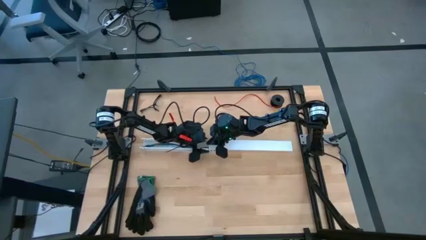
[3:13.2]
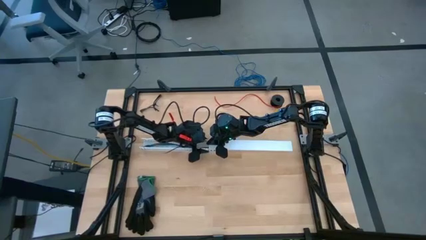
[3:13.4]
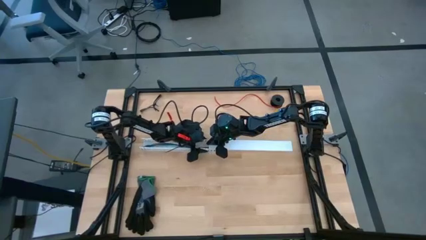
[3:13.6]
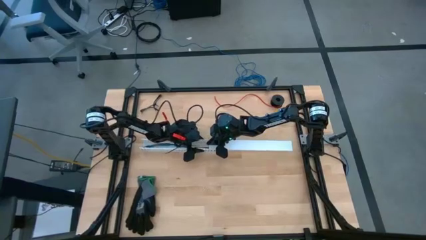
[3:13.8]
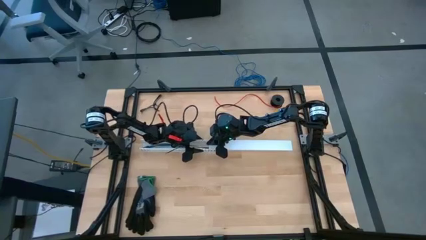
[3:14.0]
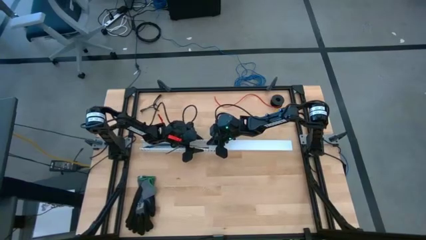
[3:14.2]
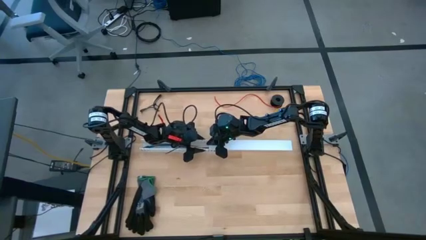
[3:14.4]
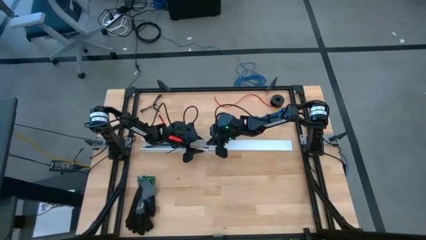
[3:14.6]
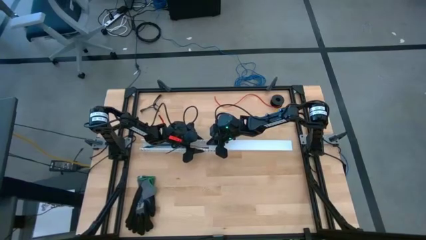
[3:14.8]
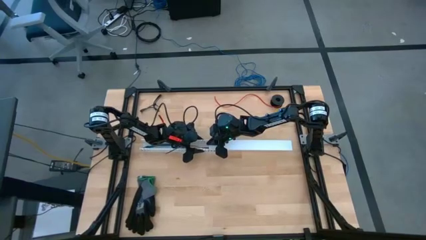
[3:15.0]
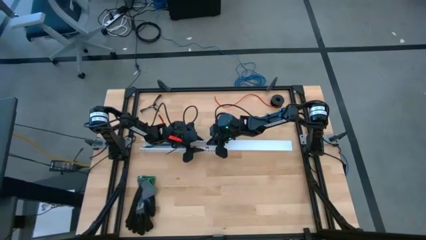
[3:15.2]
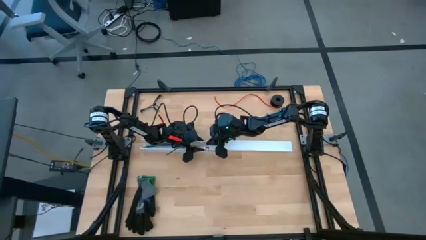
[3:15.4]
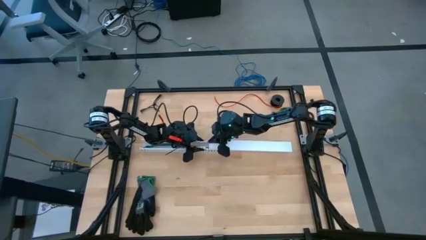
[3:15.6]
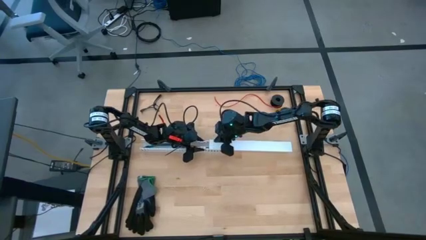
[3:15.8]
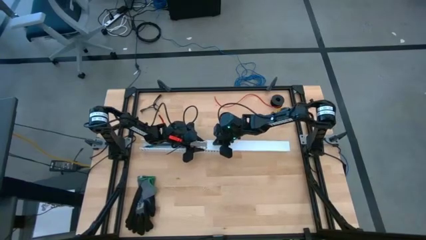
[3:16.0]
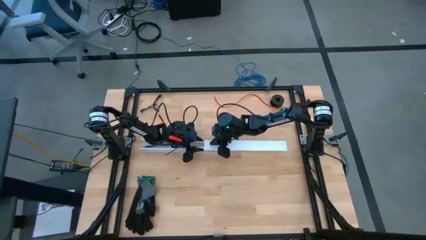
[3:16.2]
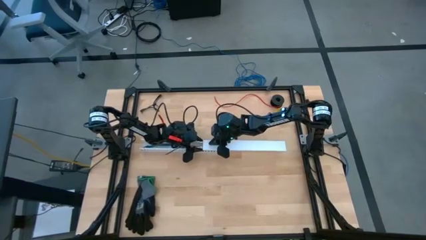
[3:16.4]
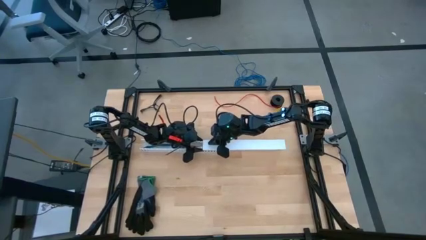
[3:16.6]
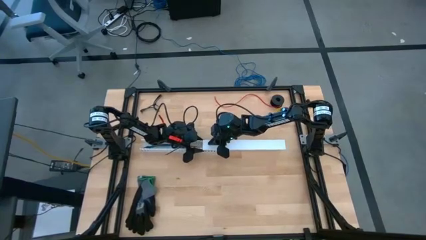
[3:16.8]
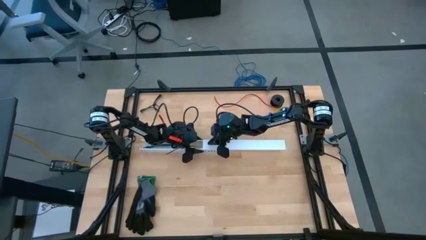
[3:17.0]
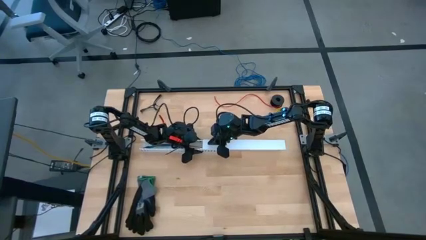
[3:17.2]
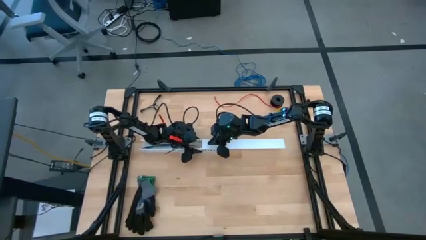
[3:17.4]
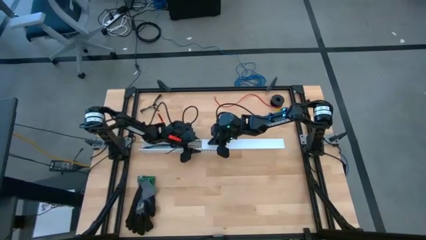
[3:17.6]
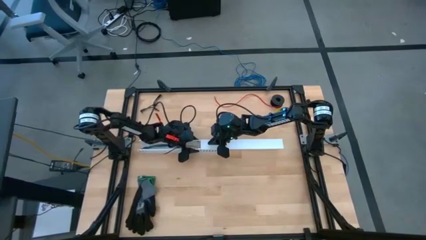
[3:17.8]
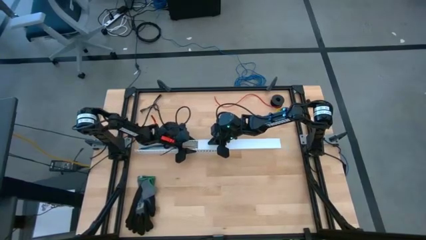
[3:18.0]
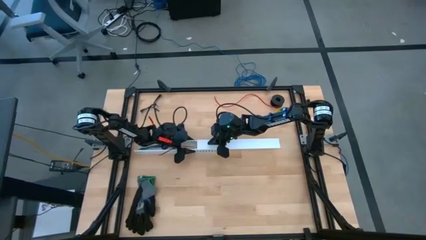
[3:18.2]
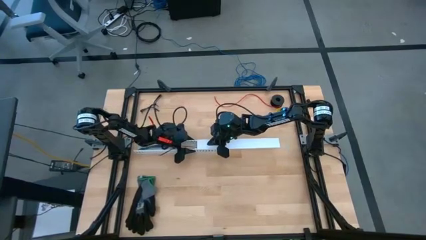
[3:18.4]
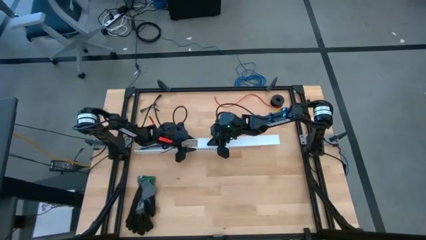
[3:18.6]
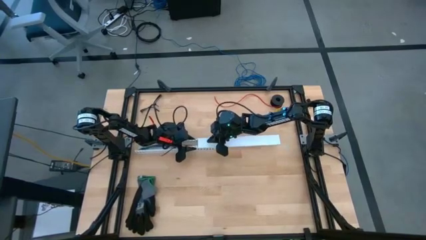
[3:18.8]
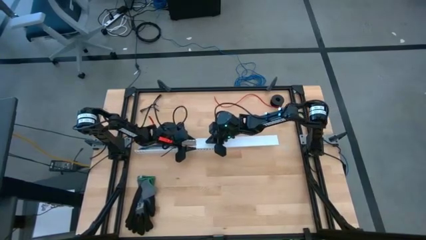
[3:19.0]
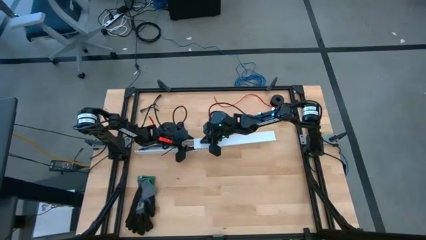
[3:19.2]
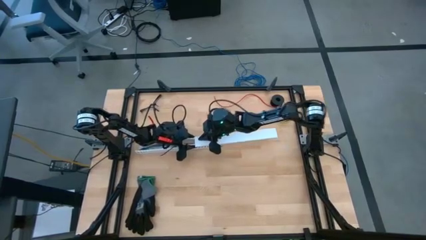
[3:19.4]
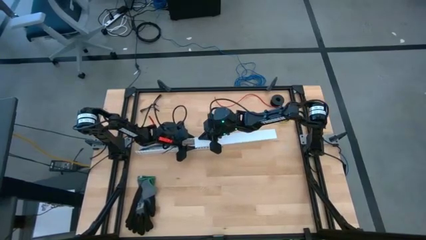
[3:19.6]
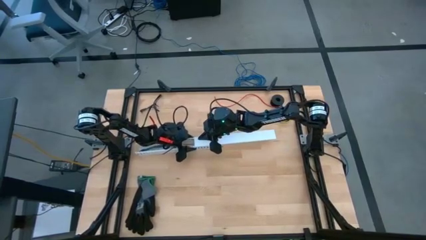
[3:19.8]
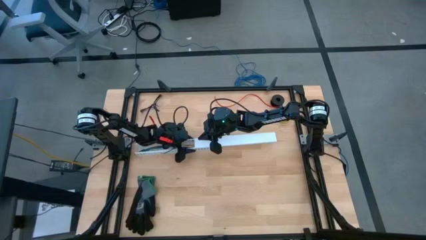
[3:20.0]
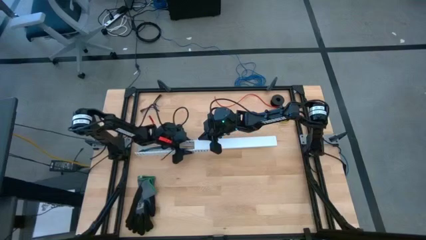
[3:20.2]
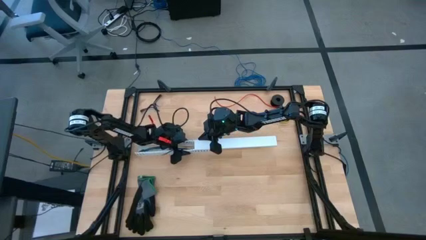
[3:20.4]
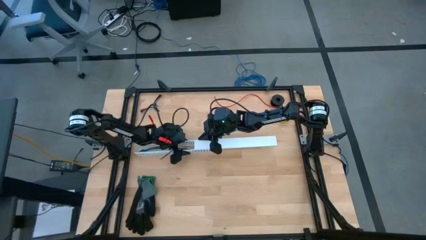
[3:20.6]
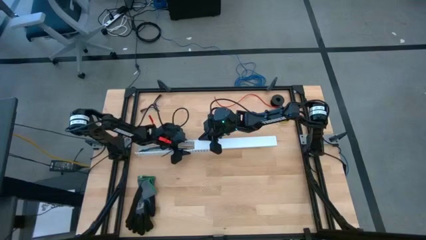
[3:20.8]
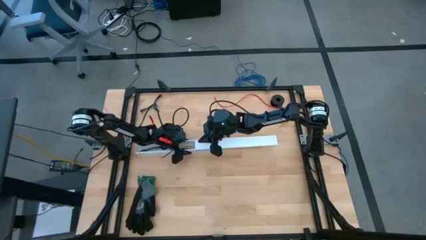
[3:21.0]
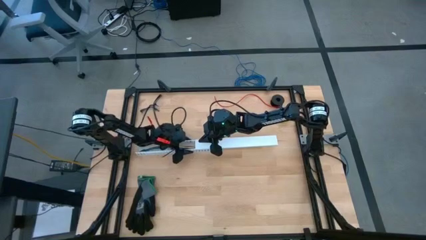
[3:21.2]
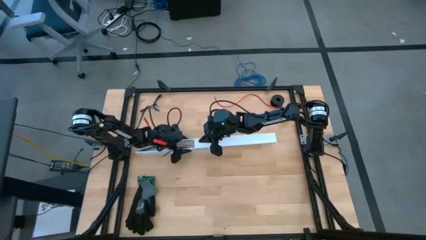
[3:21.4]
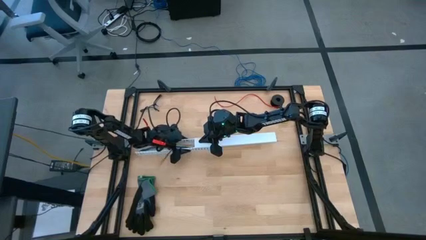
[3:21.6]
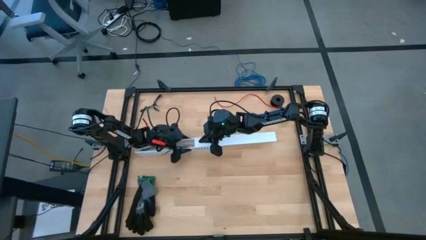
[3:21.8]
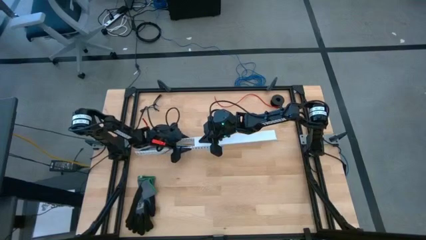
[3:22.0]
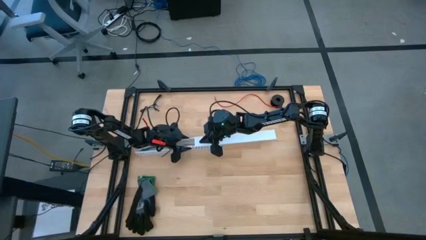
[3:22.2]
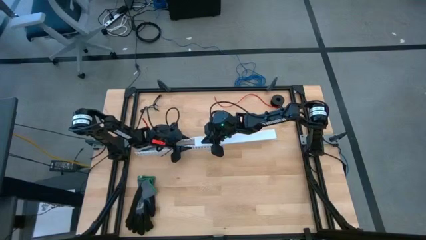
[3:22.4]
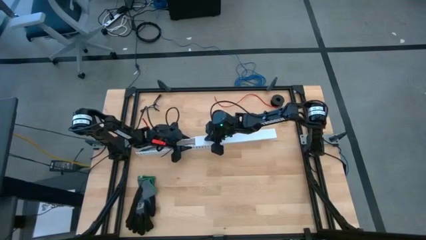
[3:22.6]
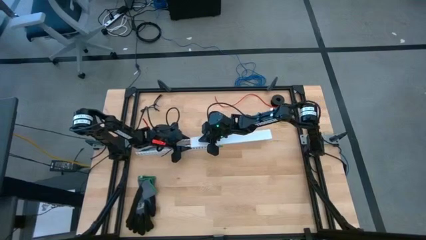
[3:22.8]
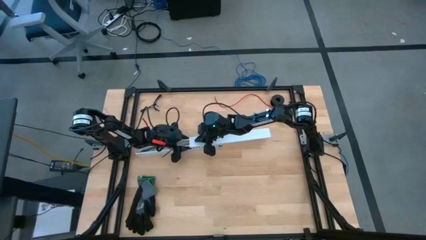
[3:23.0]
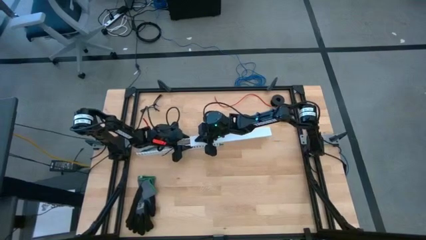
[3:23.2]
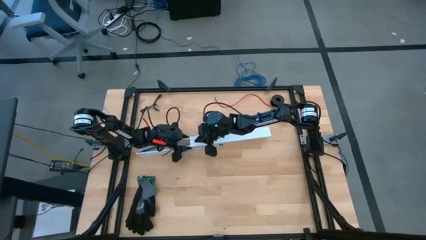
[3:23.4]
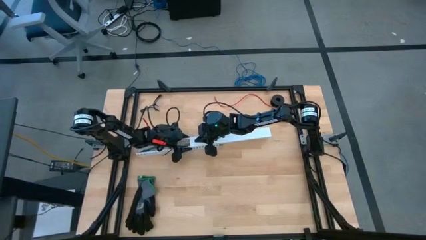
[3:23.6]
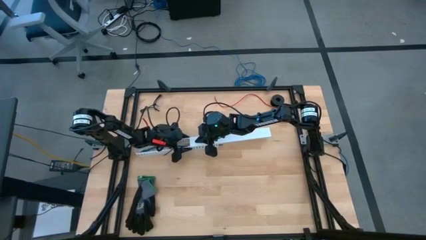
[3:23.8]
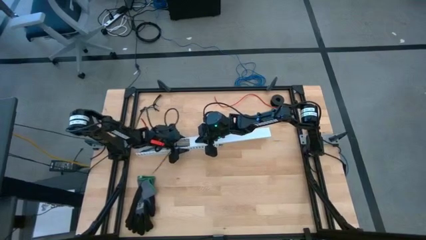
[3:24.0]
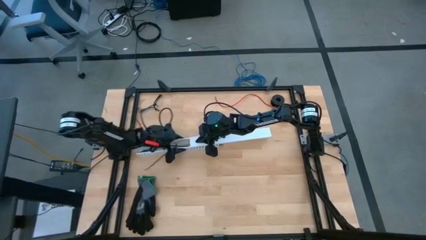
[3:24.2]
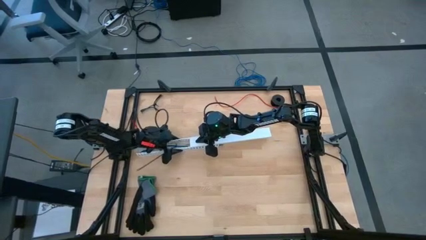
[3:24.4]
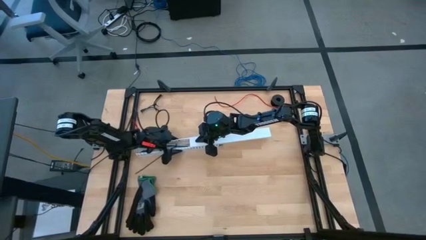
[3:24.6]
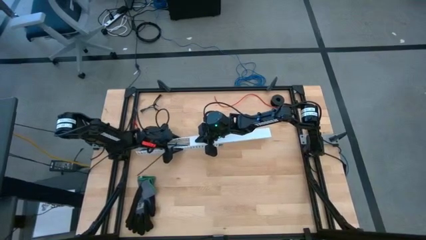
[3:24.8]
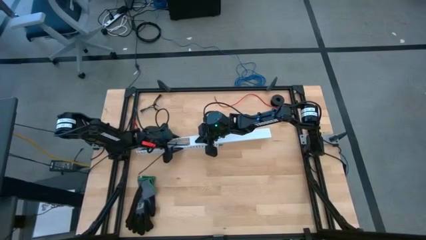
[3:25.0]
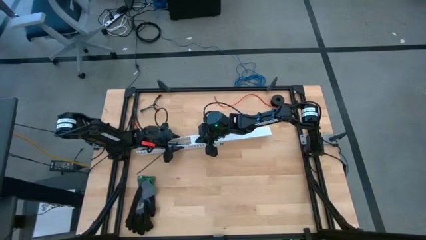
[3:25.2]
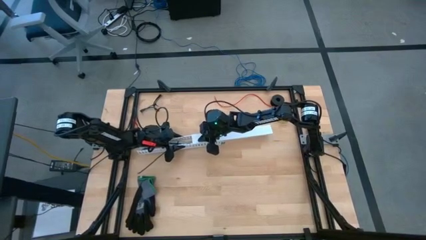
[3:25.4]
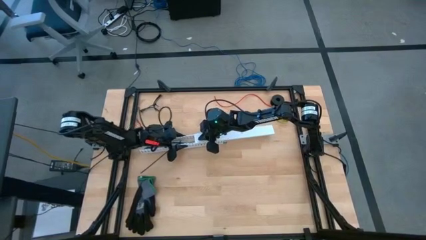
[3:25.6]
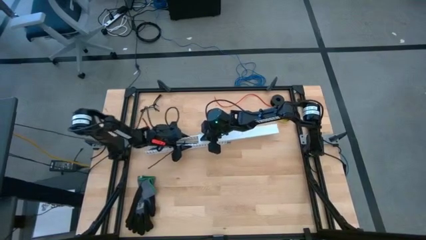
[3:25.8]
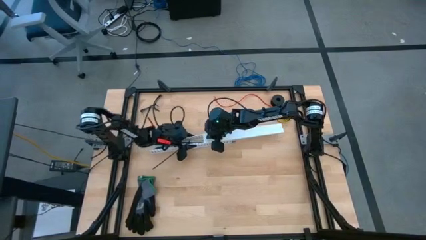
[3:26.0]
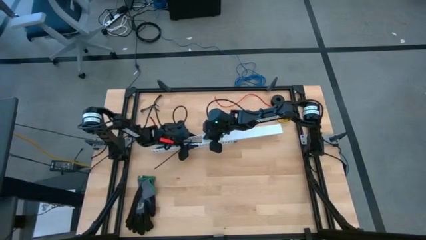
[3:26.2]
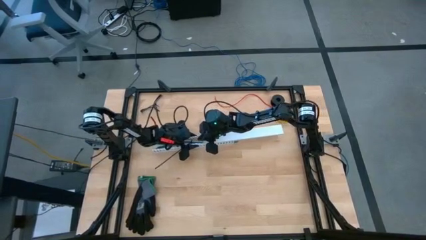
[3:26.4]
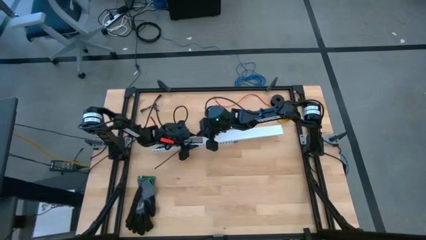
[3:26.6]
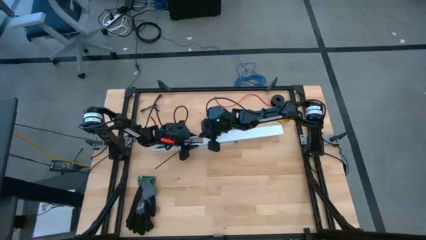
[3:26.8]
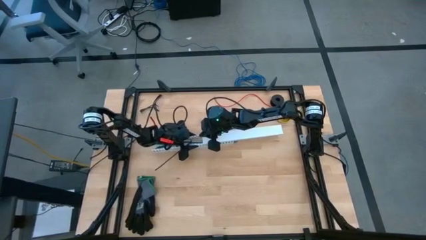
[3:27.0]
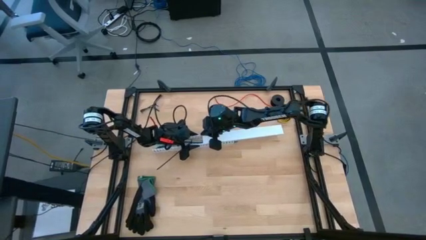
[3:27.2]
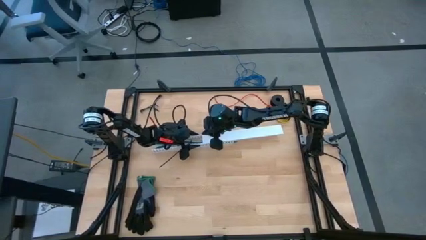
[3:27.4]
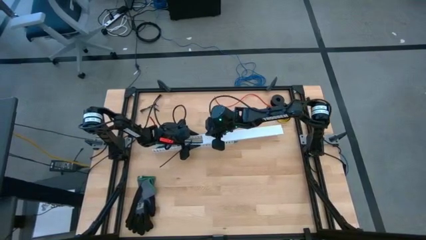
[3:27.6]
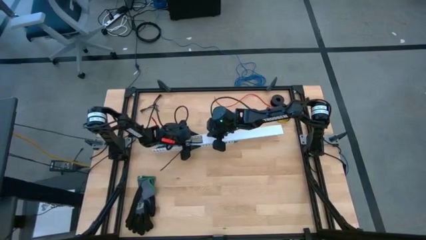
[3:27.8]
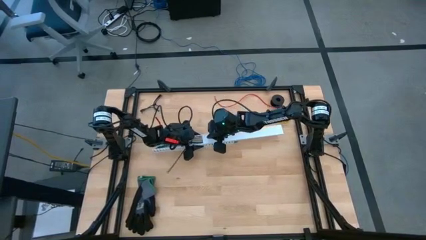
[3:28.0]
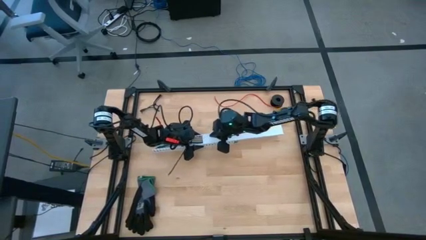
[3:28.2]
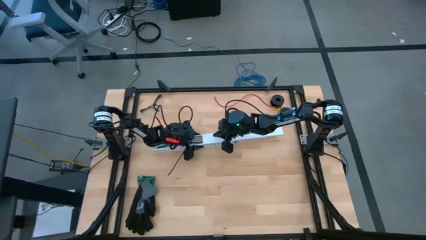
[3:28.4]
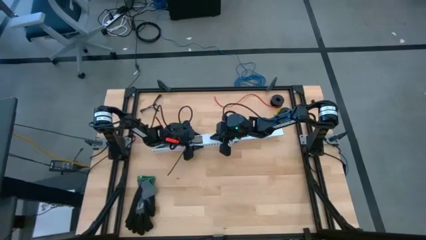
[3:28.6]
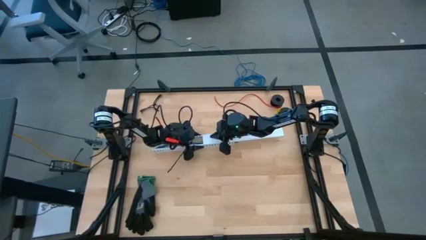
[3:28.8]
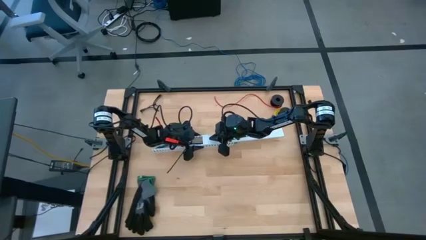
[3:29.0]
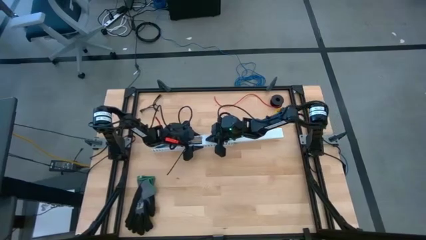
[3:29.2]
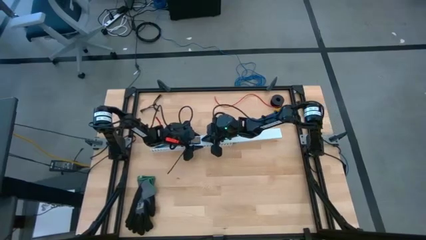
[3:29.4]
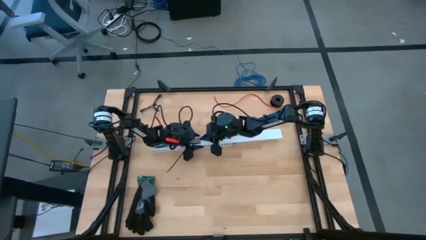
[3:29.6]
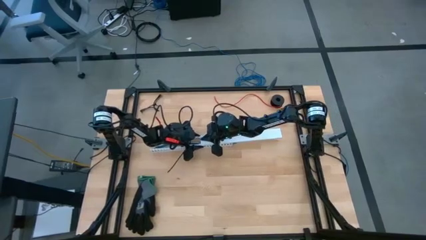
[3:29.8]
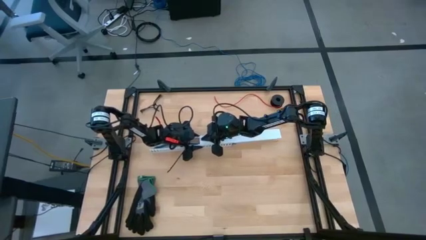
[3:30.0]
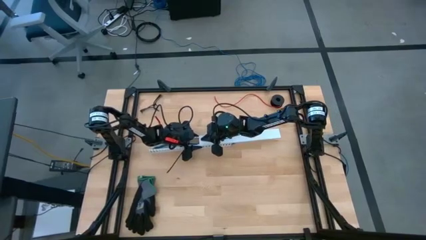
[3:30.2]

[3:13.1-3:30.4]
Task: Ziptie cables
Close the cable duct
